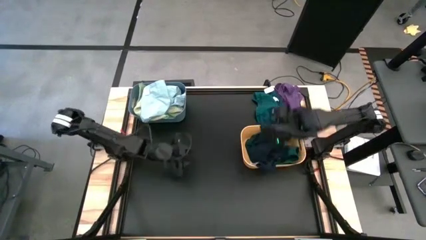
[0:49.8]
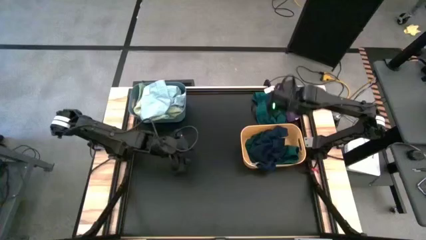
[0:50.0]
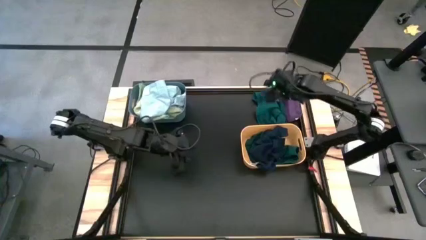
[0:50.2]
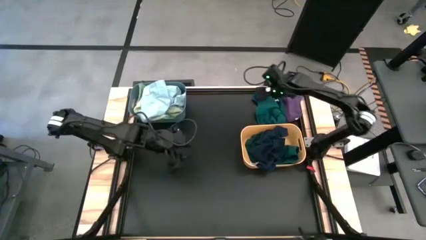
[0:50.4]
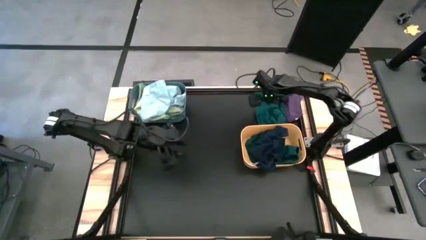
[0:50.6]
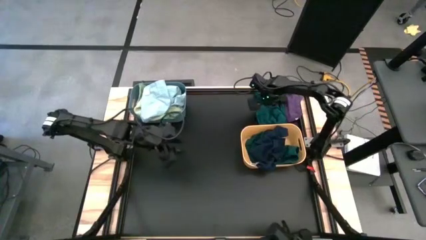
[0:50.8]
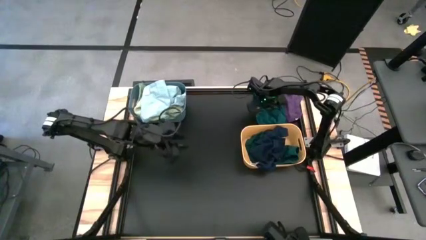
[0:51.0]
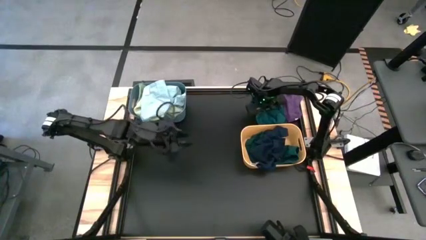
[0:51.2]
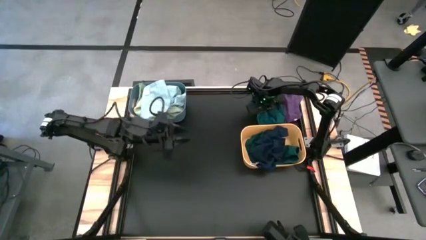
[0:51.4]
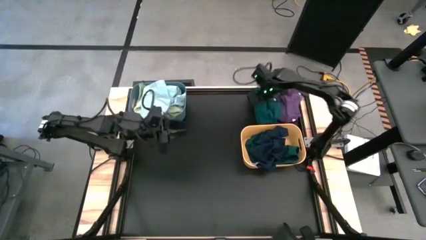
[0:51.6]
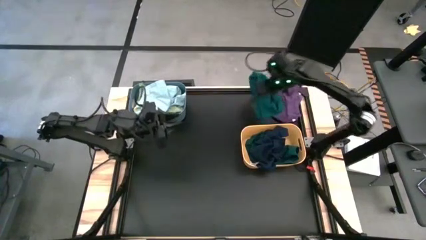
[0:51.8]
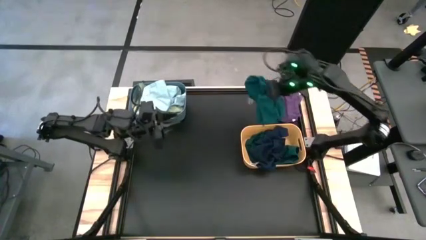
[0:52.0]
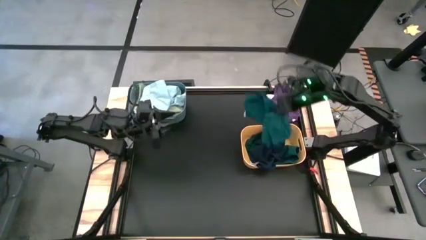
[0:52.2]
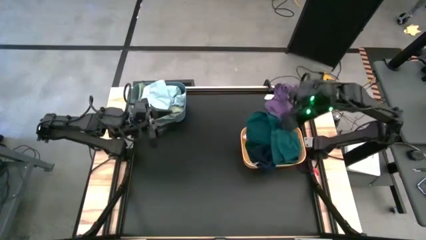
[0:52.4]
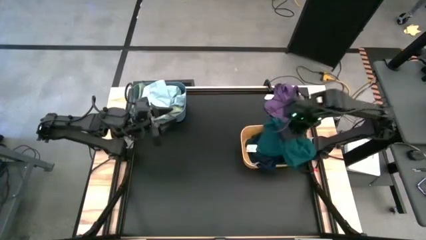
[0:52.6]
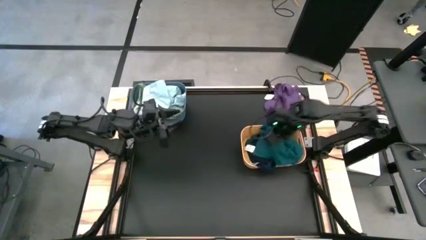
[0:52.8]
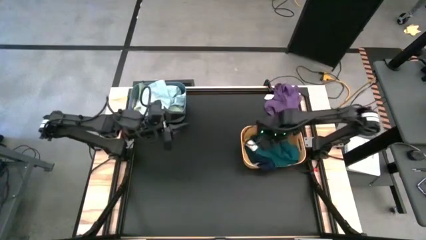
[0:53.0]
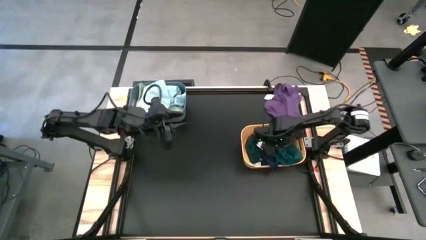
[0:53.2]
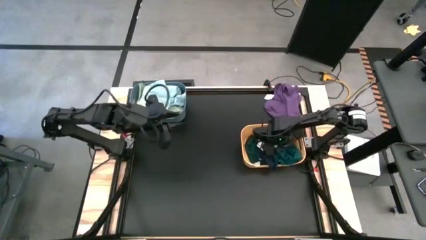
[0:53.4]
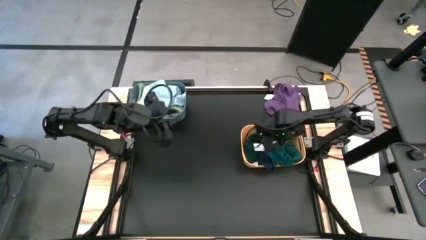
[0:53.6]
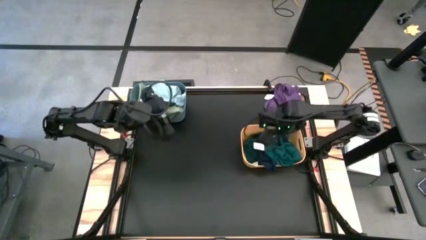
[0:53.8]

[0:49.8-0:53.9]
Task: Sort towels by color in basket
Put the green towel into the yellow bin

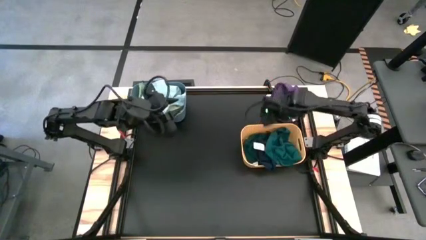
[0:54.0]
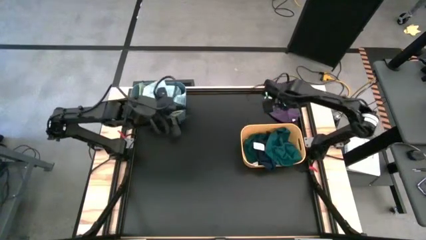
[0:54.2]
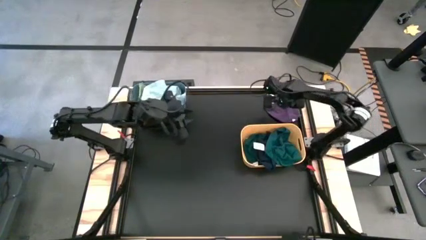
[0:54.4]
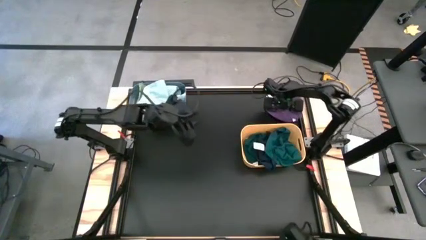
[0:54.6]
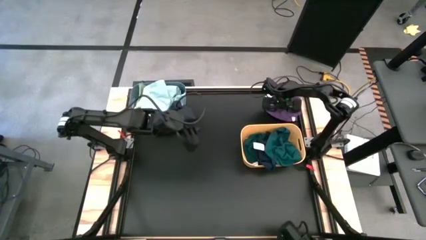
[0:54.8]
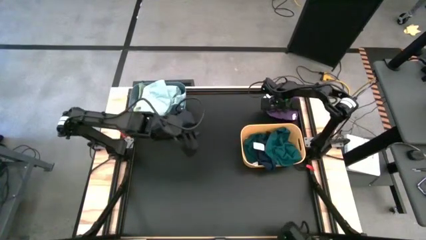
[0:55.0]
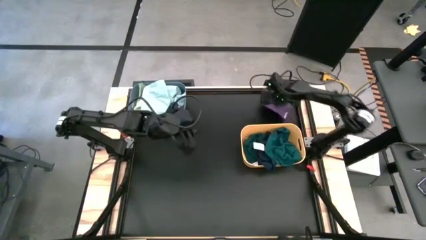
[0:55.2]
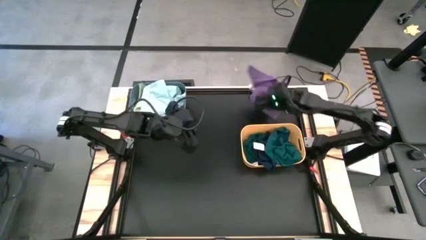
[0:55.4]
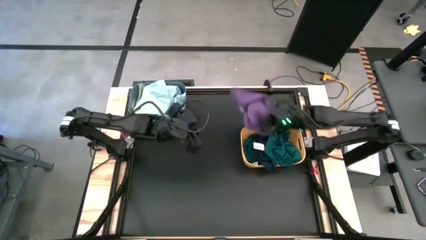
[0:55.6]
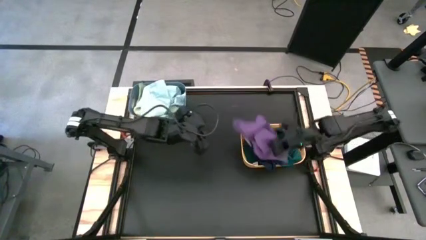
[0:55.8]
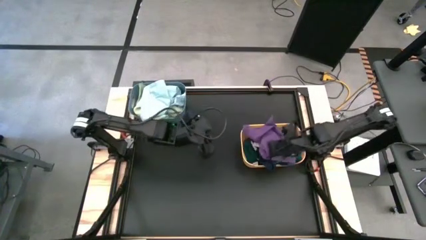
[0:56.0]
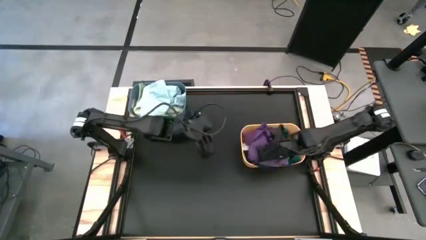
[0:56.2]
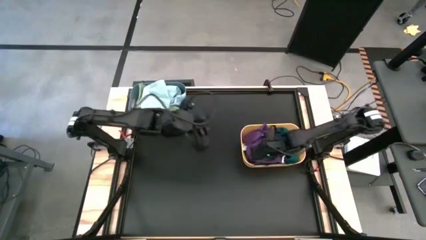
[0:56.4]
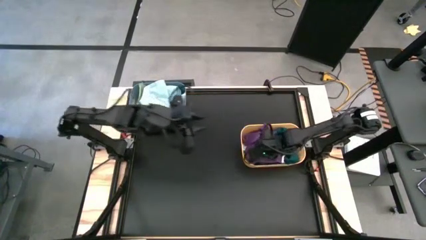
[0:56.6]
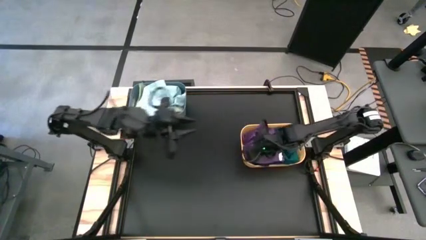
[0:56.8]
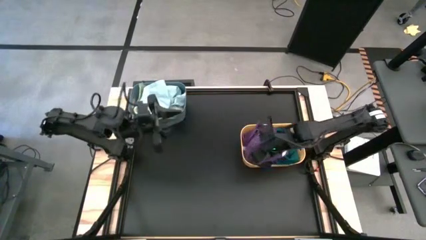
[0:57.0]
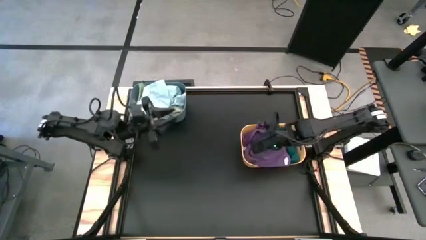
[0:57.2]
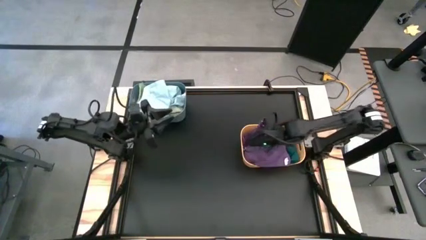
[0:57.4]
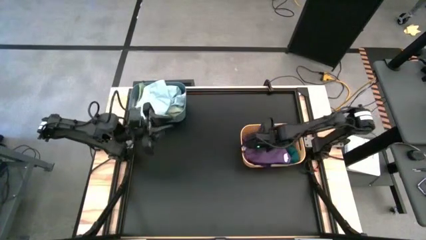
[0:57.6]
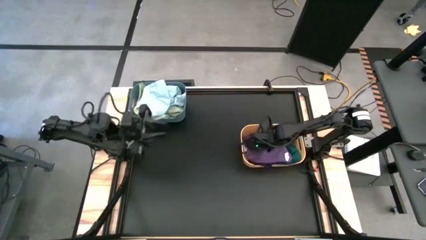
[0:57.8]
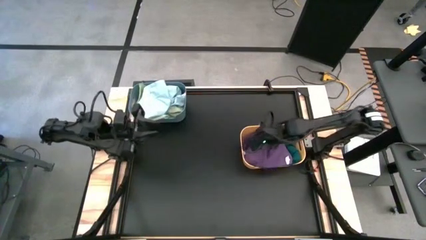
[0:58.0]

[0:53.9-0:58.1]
Put the violet towel into the yellow bin

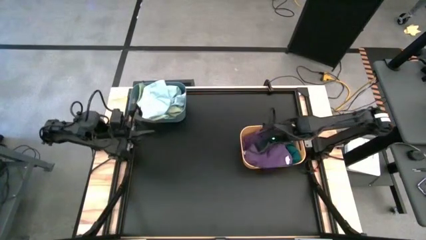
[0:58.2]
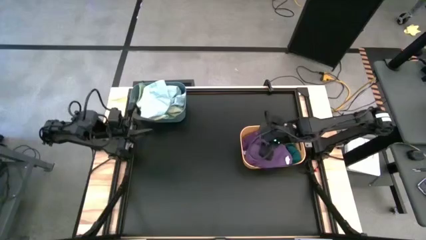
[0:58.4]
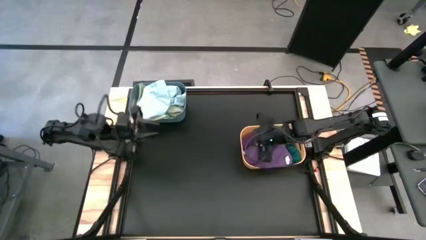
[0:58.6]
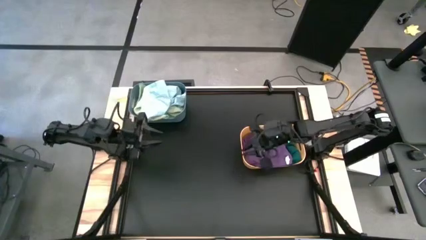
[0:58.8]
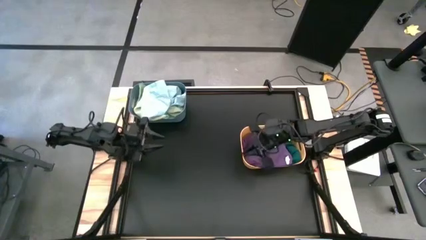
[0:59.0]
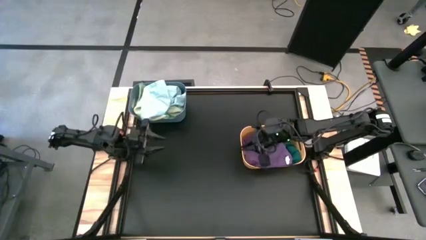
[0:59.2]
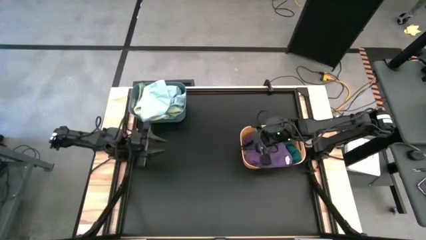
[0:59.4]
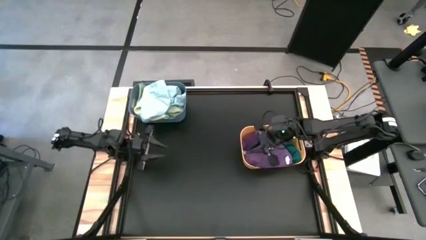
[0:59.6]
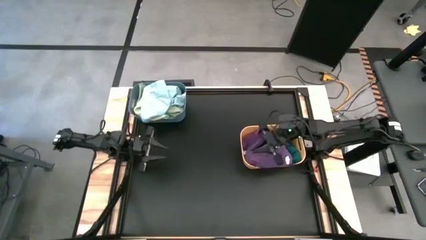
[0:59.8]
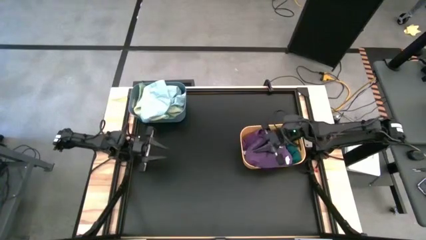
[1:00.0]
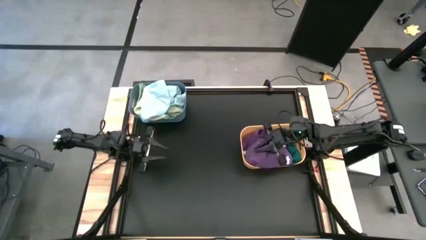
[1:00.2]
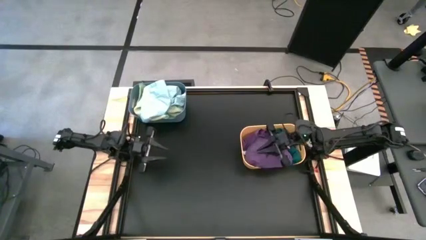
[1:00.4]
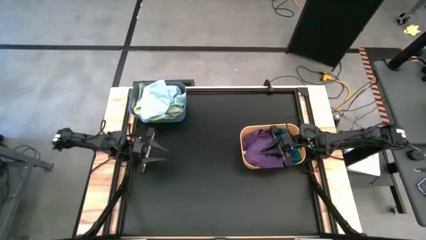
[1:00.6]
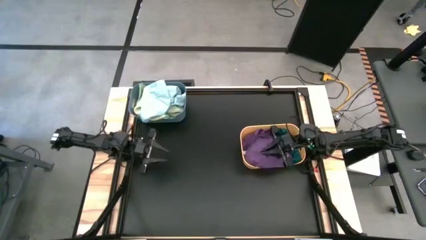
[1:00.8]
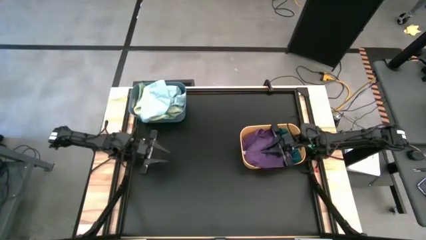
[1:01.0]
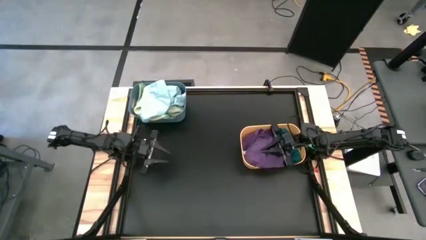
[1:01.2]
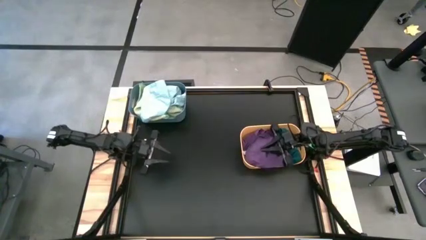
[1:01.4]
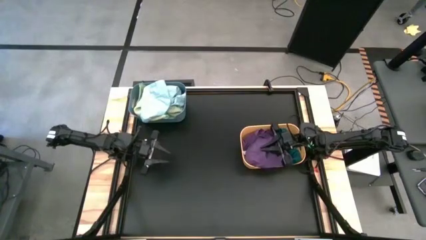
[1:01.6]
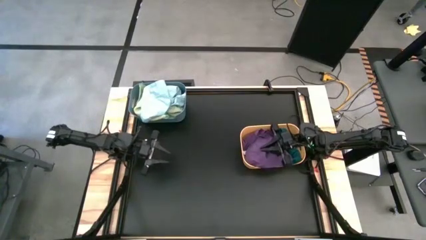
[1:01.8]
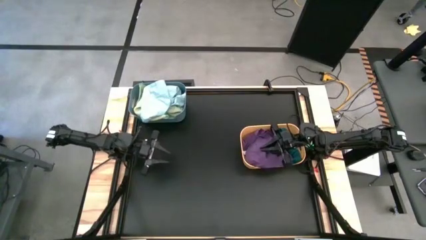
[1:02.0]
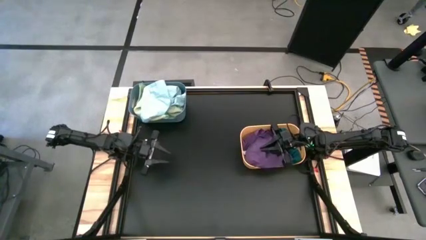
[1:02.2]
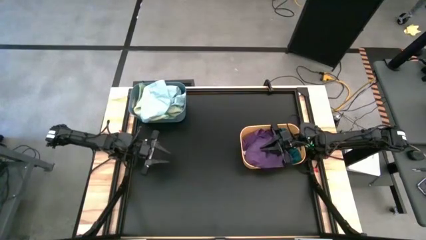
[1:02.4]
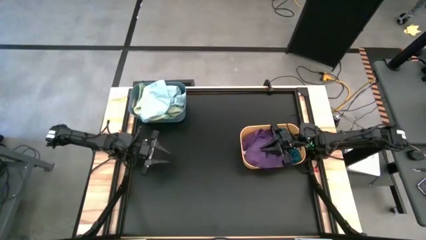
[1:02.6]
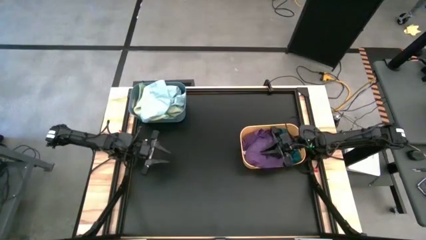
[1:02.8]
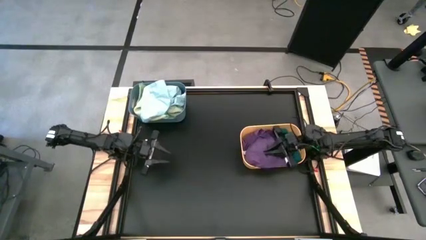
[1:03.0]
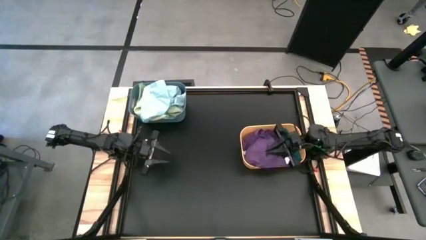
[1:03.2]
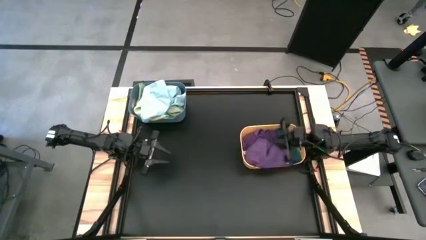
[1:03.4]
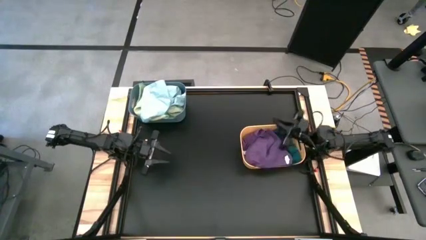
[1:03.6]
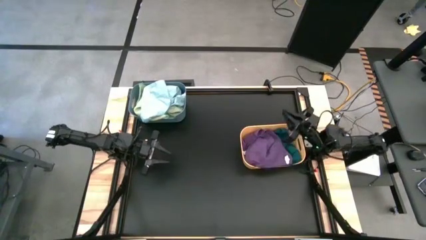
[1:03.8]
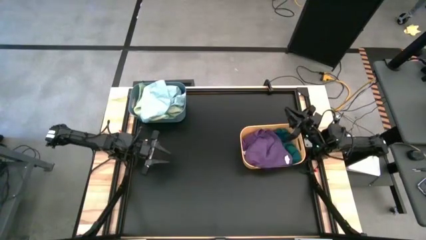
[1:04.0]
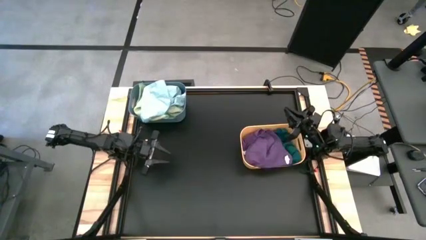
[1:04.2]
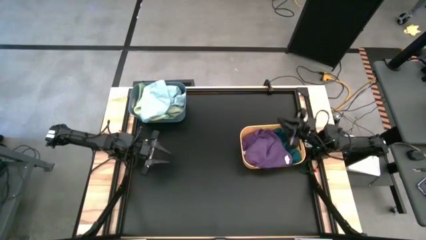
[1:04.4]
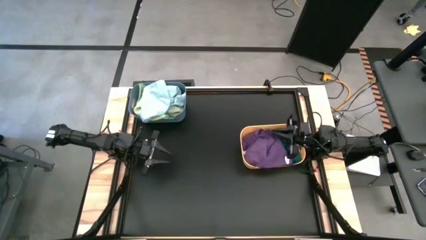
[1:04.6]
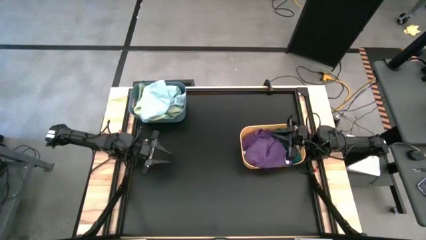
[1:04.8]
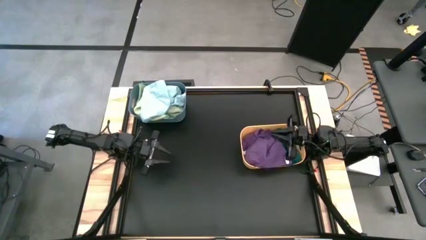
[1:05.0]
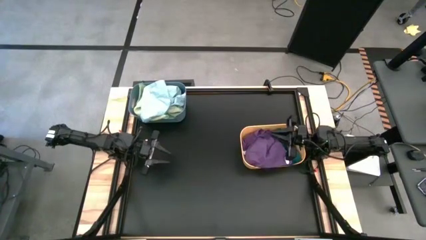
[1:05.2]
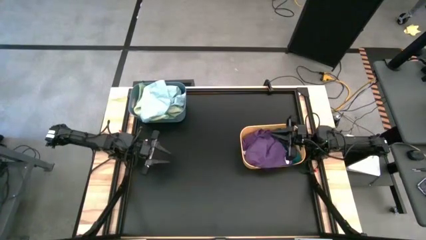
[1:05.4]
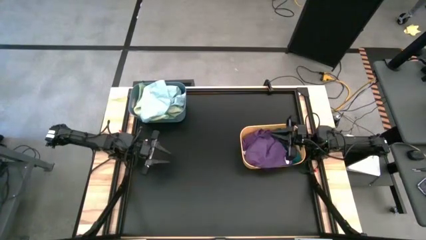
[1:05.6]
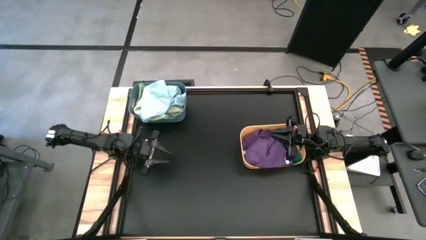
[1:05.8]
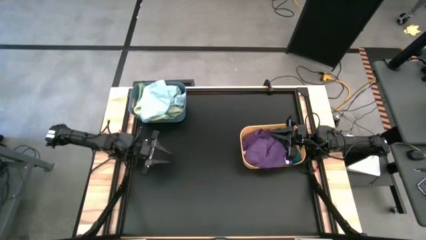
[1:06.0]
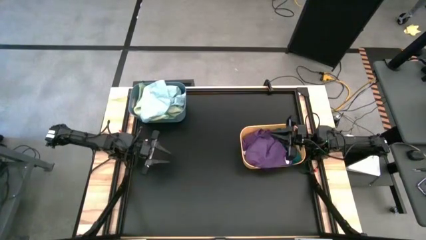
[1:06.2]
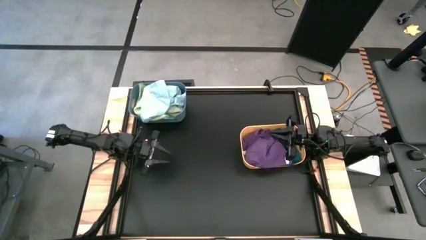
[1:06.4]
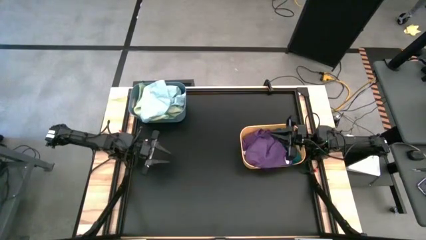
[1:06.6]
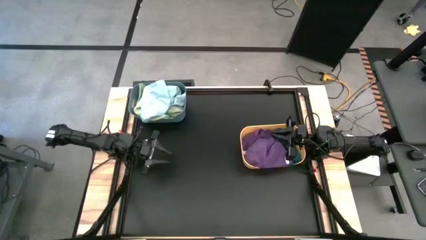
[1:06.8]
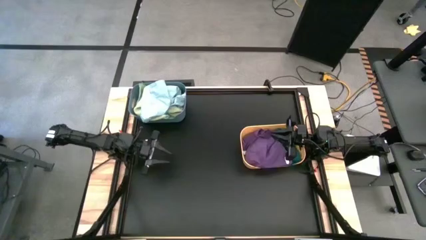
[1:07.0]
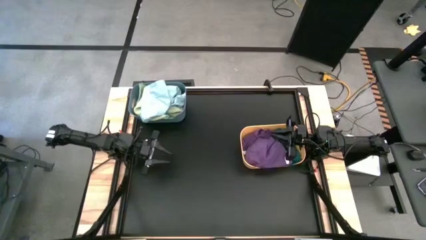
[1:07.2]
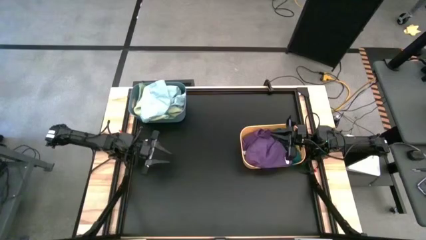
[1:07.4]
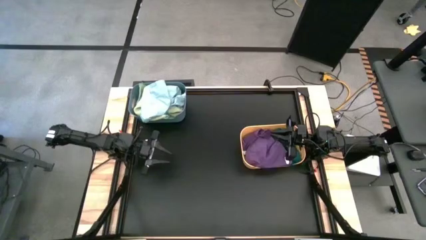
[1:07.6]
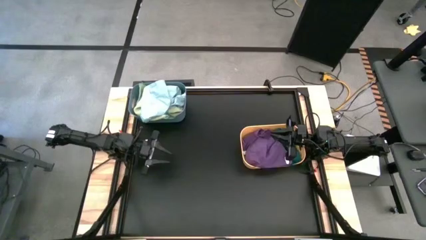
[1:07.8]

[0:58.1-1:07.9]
Return to Home Position
